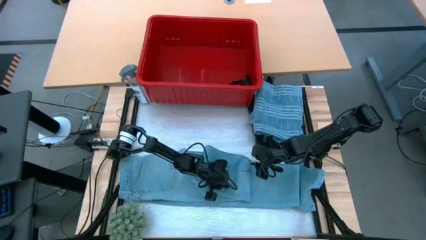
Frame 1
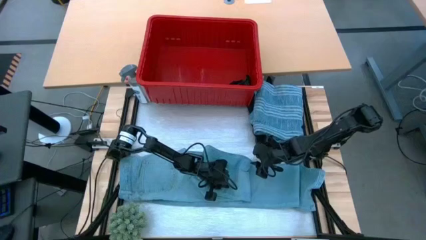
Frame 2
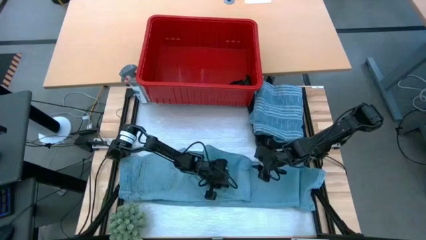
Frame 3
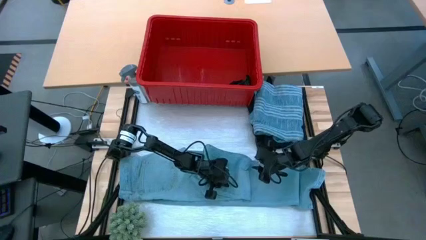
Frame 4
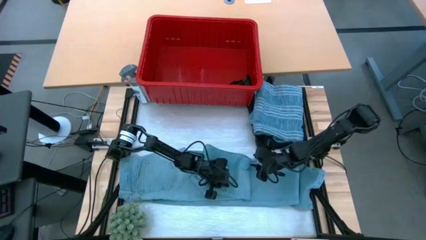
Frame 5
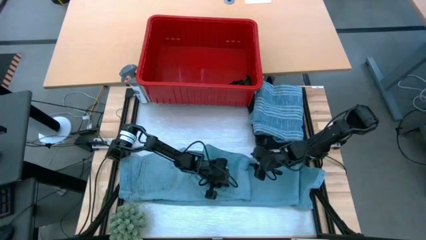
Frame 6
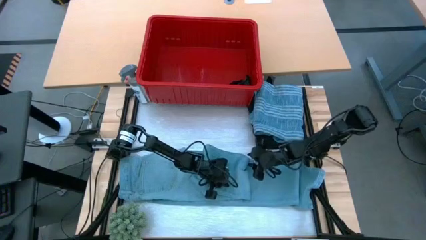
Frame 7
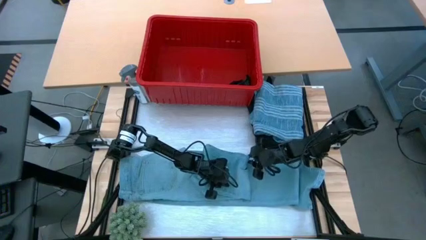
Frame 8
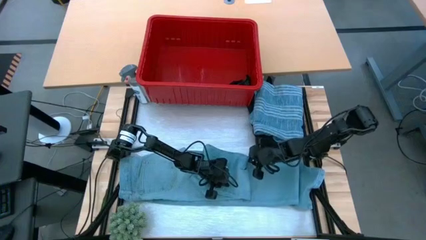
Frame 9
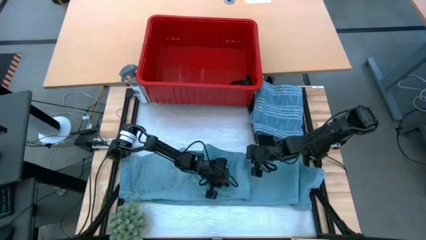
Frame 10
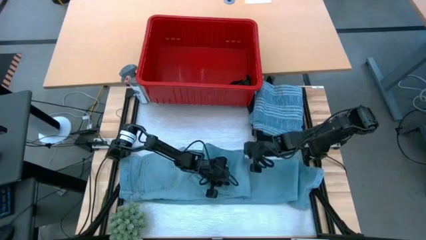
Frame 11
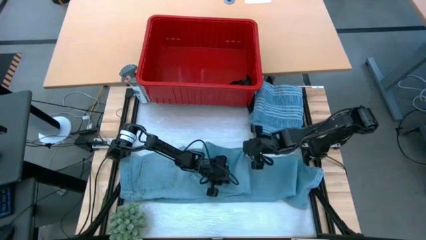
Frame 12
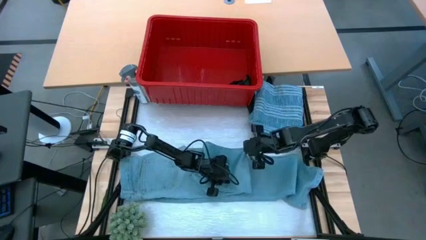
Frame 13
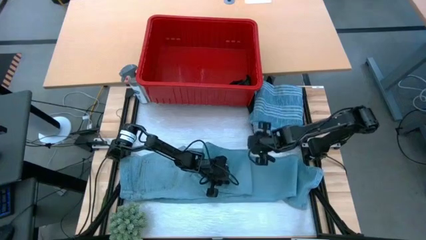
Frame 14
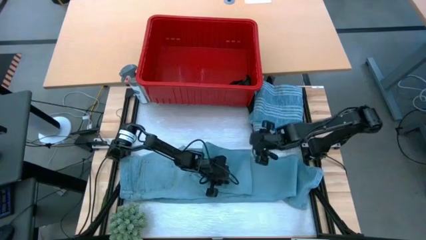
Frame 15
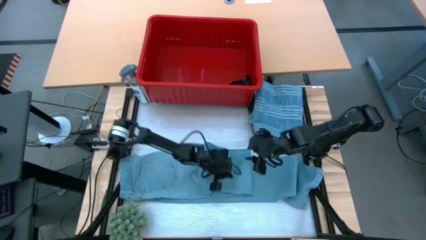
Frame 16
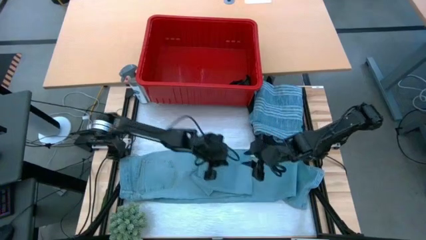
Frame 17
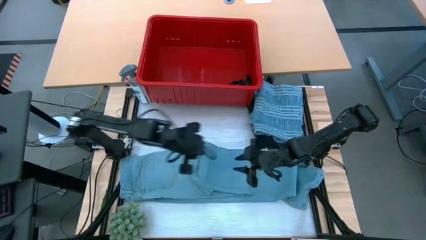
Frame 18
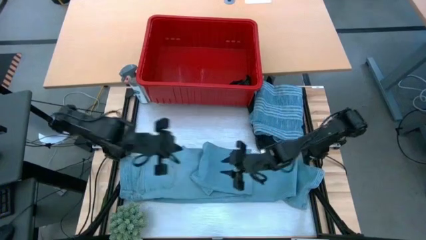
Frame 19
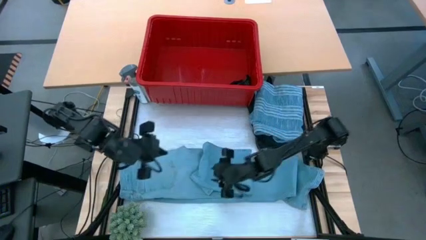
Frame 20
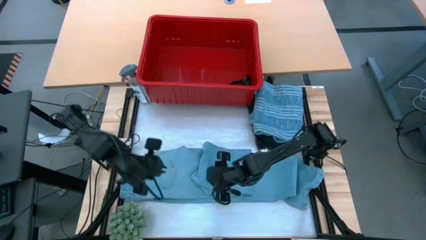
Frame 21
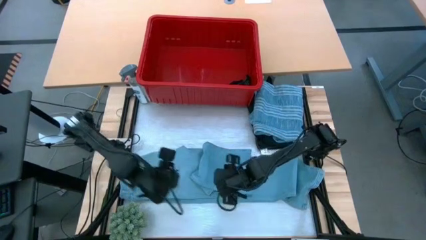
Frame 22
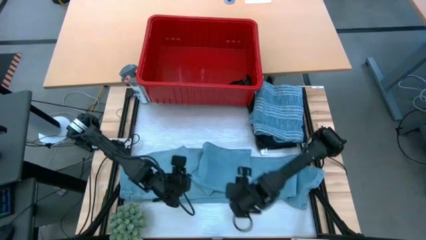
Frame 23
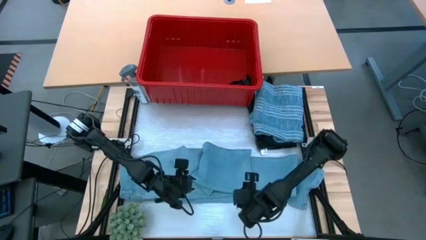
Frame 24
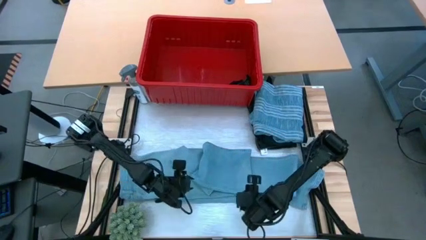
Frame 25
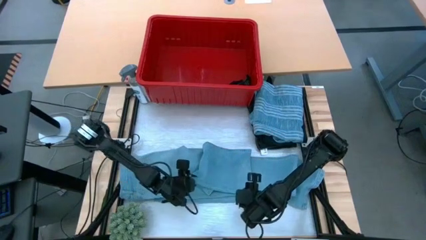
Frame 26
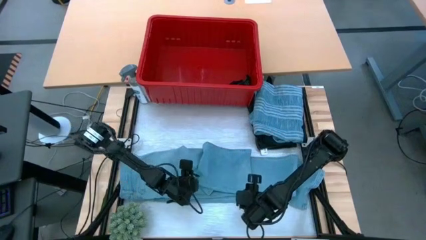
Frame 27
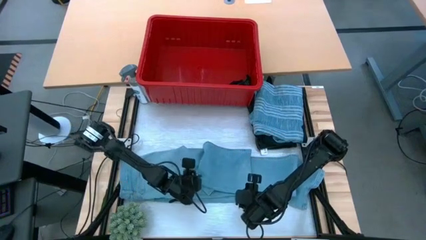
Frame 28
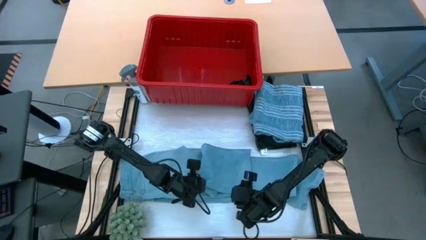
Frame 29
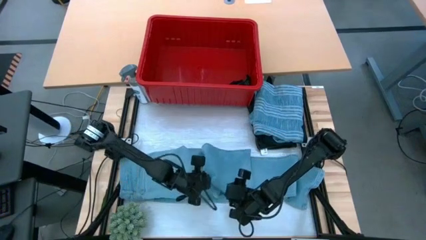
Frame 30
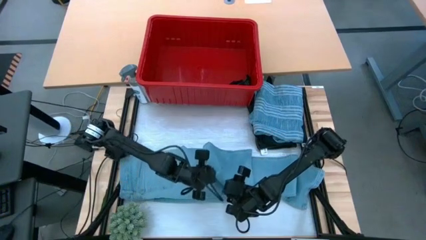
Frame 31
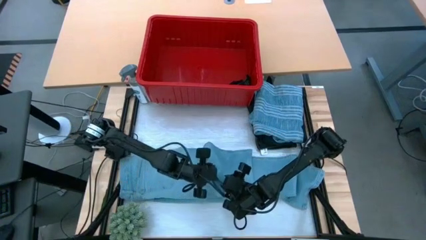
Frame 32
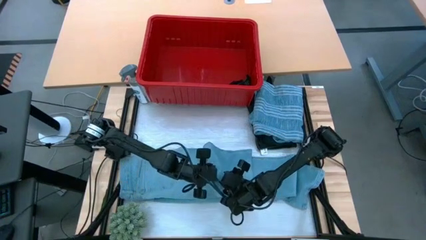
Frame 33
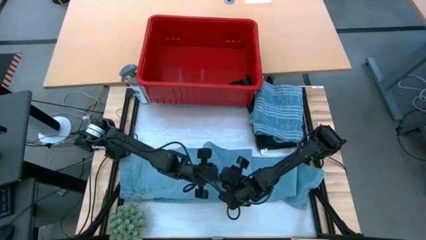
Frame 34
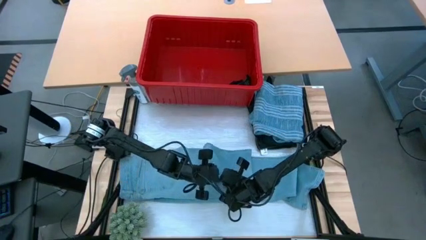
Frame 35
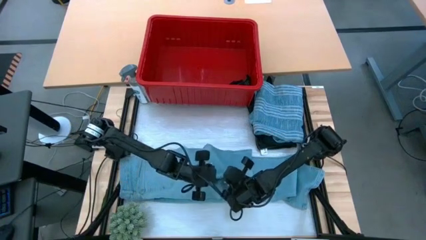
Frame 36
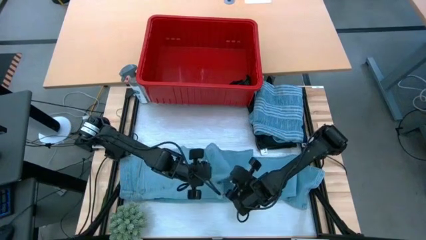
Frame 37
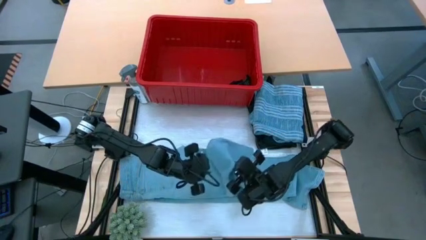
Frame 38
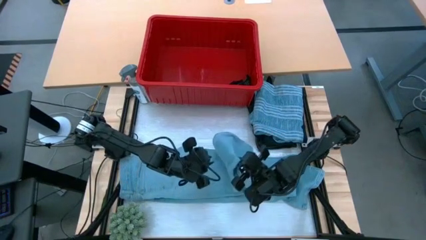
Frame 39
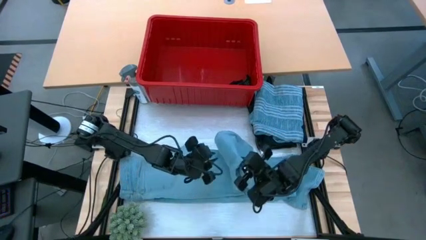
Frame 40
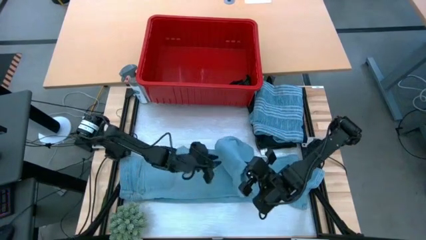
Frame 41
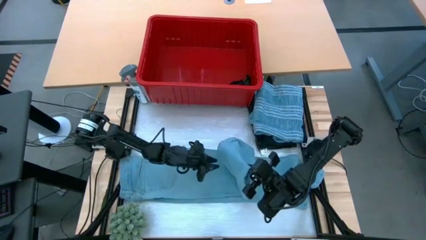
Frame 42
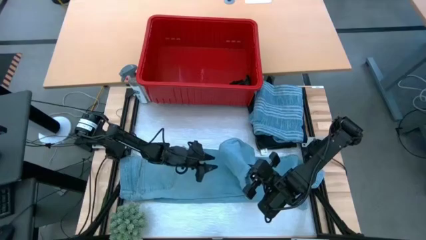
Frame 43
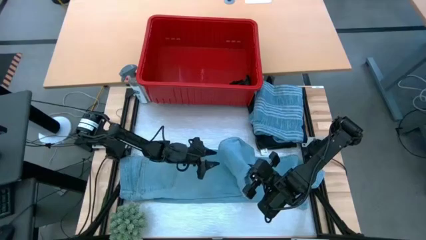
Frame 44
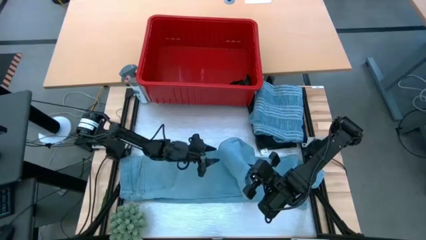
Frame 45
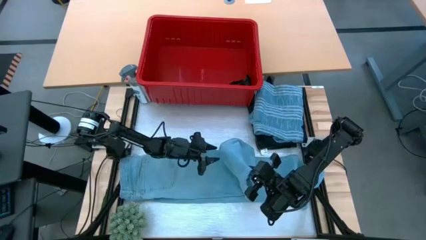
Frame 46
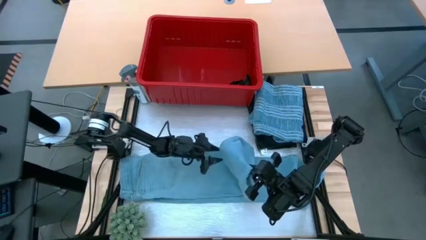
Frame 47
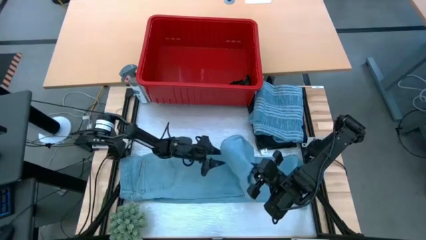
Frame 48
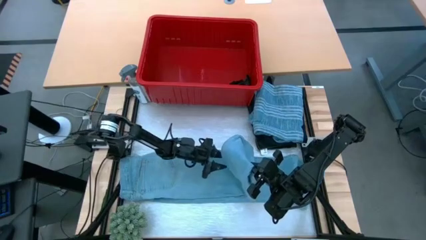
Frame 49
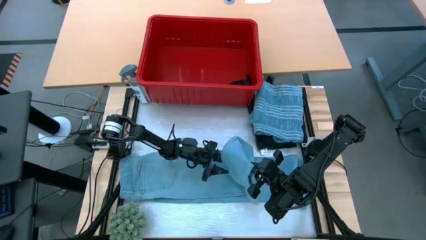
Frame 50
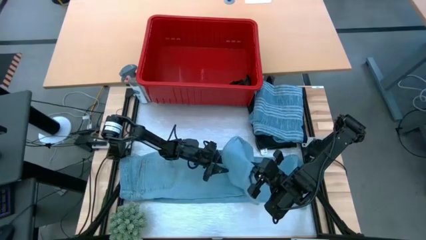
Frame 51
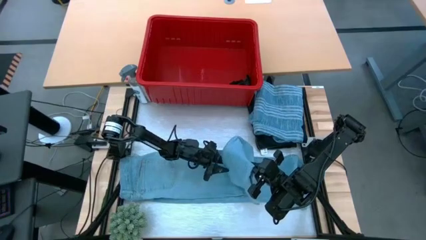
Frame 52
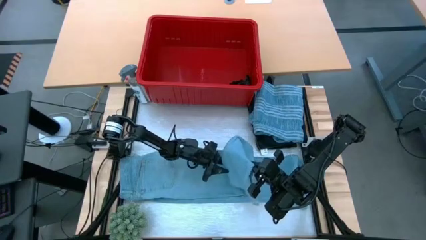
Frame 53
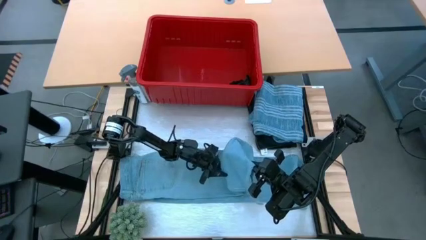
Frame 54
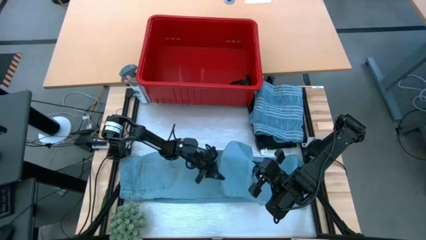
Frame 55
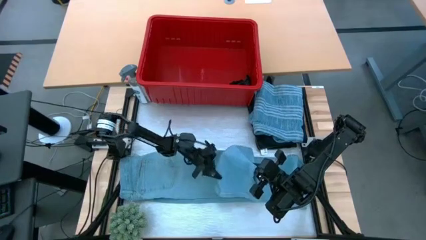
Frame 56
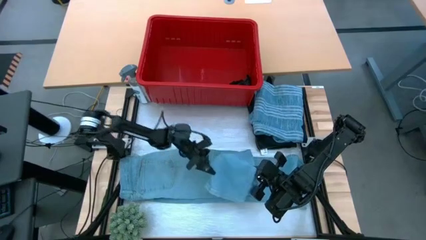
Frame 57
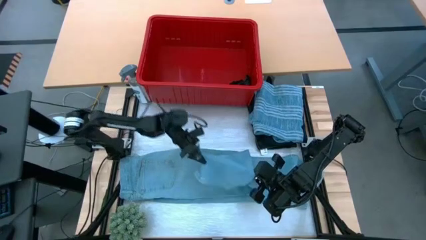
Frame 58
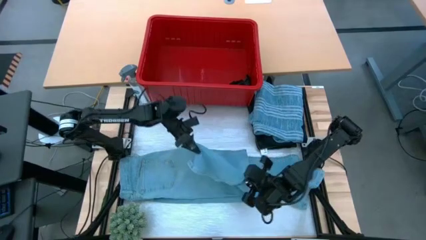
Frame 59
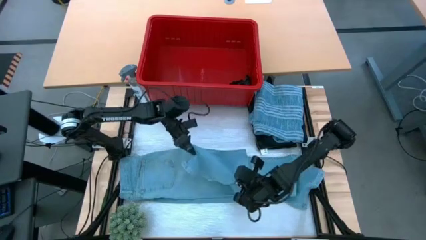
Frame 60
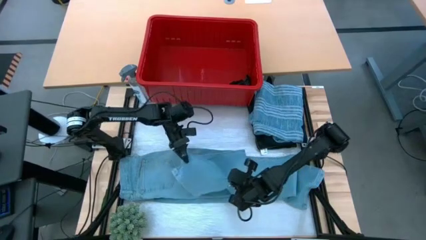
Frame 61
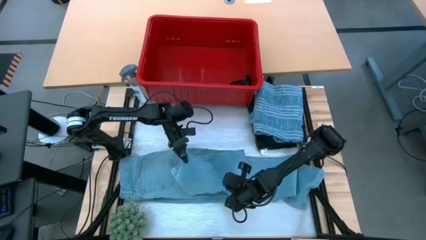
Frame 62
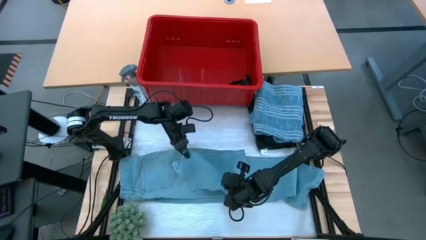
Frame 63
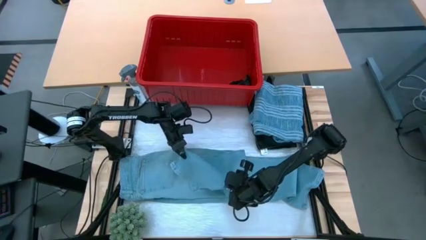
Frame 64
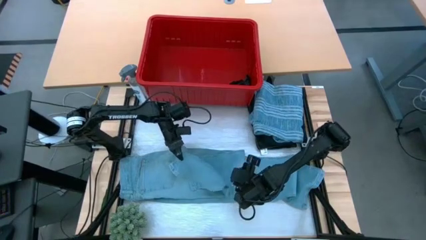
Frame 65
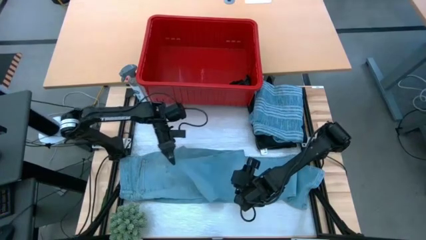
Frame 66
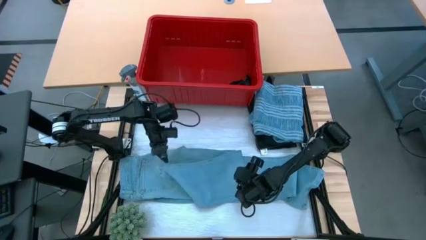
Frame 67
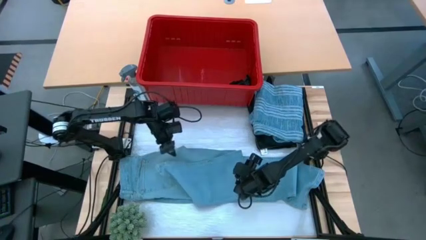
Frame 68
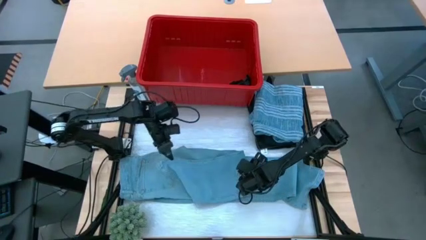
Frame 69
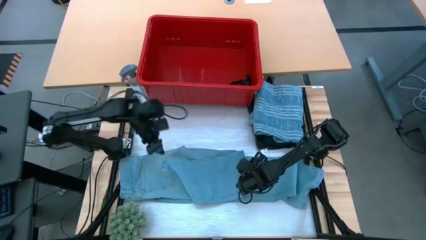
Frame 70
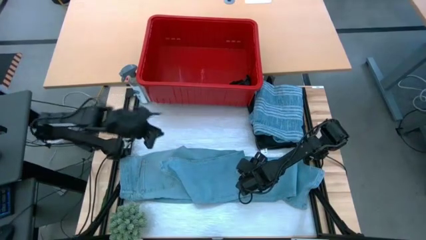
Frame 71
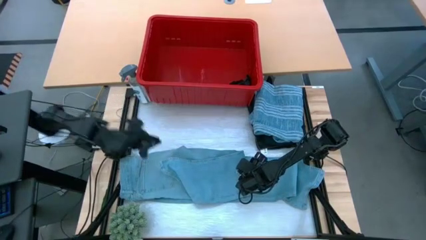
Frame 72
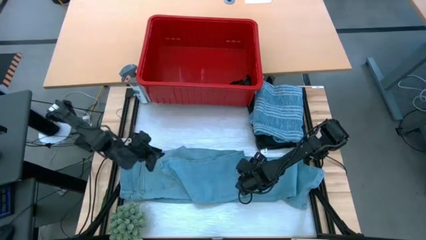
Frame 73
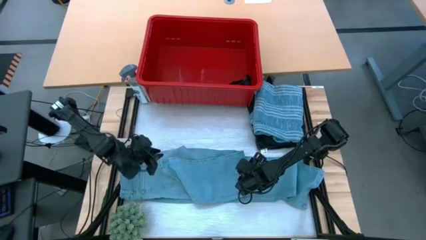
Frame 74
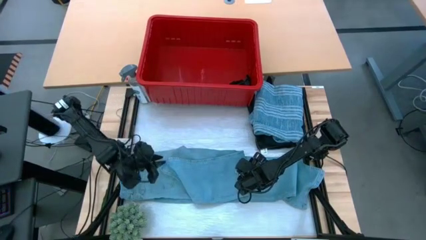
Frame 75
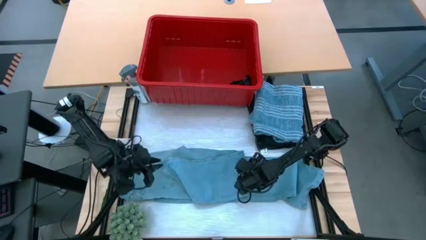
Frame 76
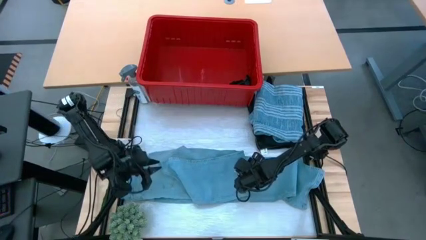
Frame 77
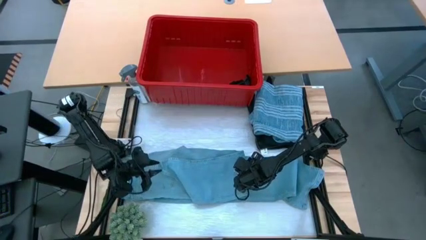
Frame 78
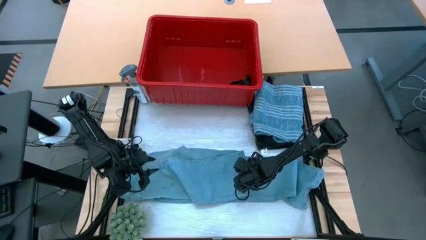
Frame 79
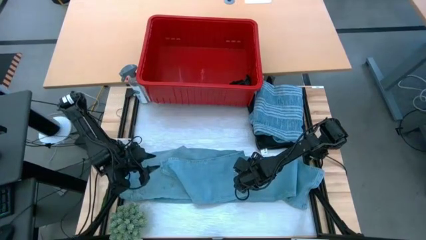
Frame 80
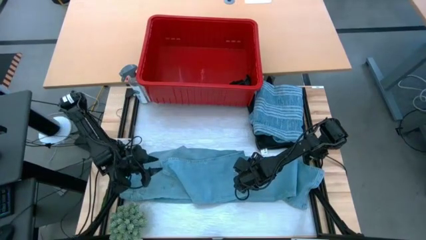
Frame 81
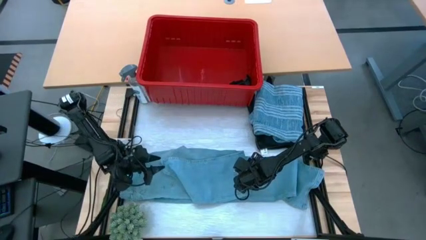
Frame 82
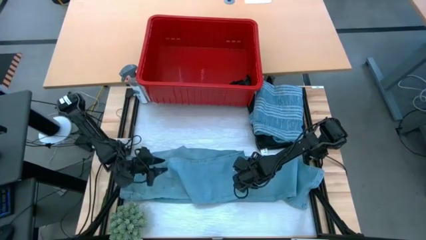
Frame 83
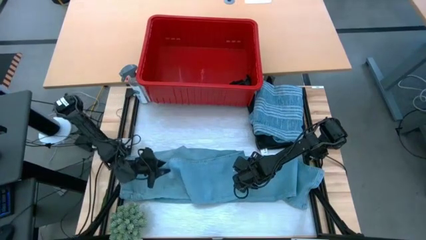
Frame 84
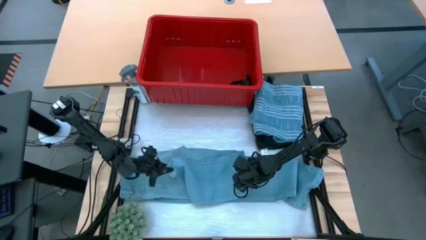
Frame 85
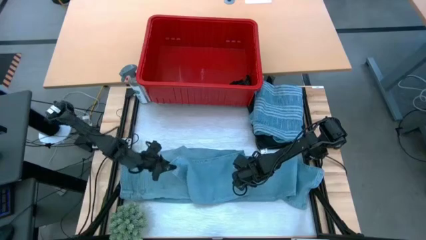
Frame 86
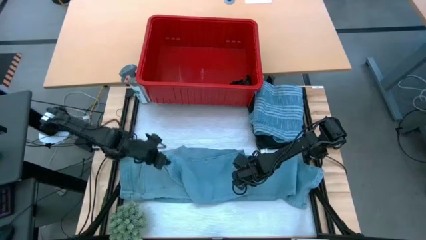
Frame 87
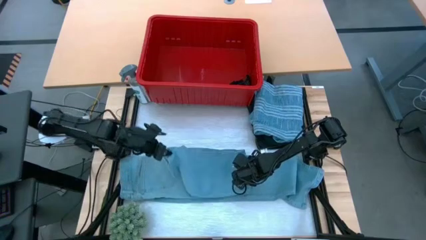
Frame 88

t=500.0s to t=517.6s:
Task: Fold Laundry from Bin
Fold the light blue pants
